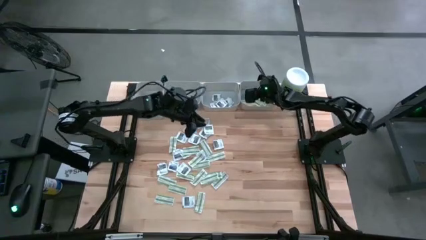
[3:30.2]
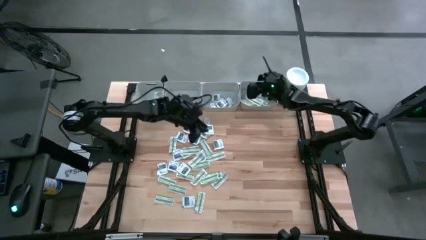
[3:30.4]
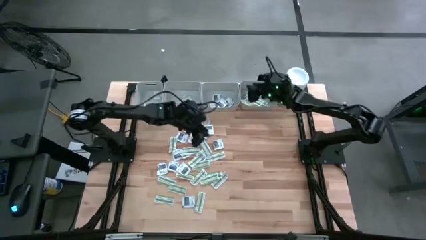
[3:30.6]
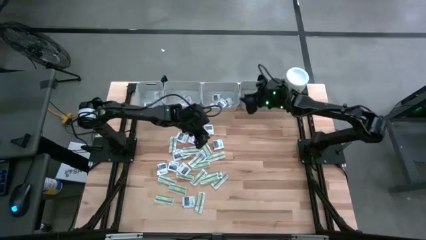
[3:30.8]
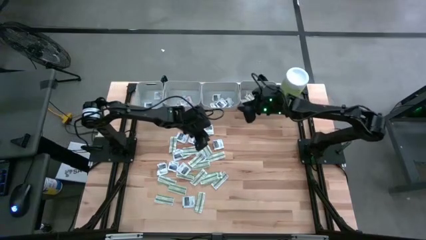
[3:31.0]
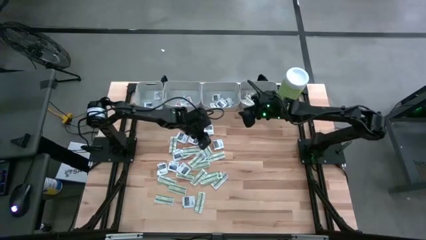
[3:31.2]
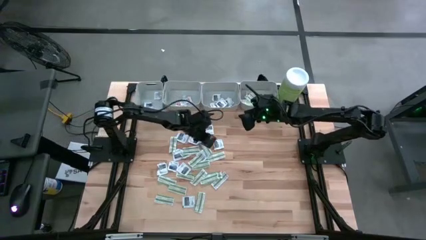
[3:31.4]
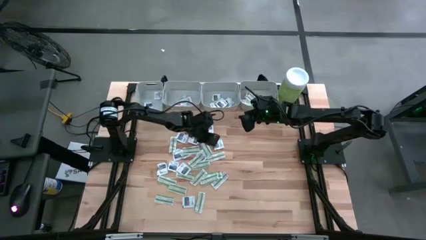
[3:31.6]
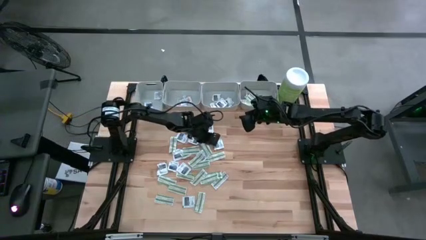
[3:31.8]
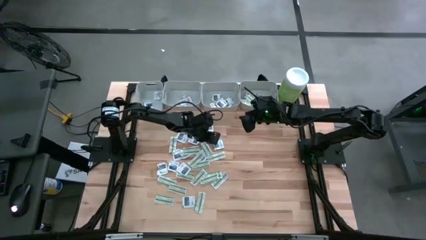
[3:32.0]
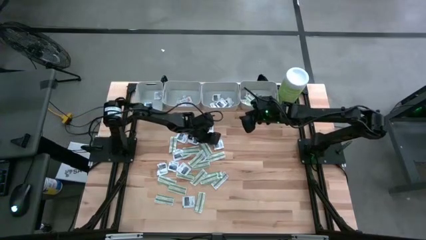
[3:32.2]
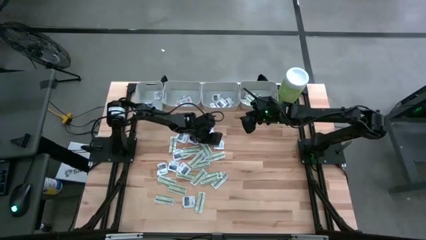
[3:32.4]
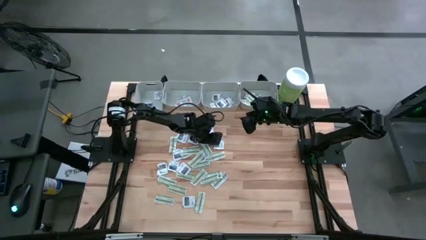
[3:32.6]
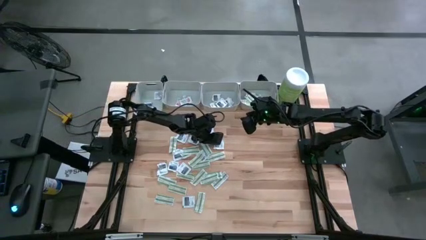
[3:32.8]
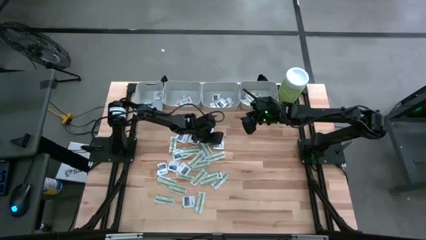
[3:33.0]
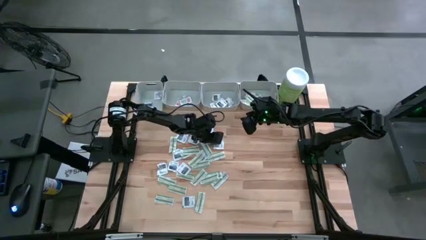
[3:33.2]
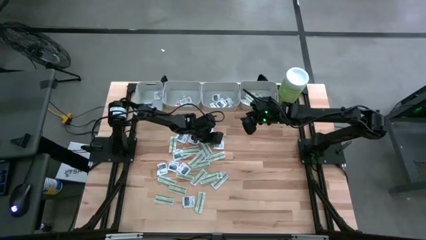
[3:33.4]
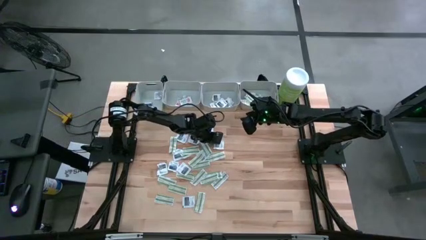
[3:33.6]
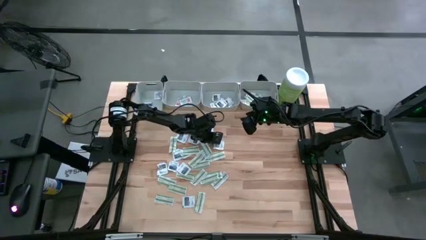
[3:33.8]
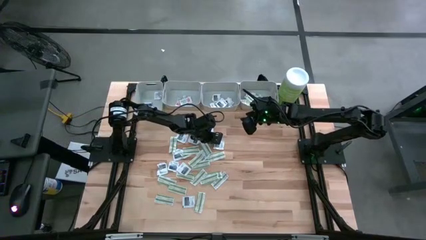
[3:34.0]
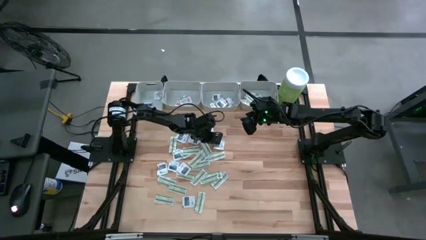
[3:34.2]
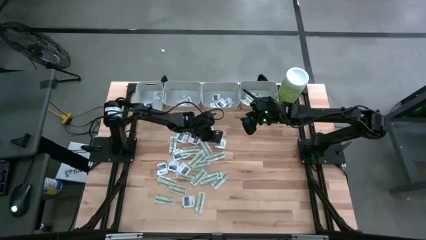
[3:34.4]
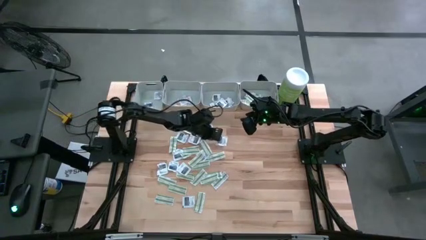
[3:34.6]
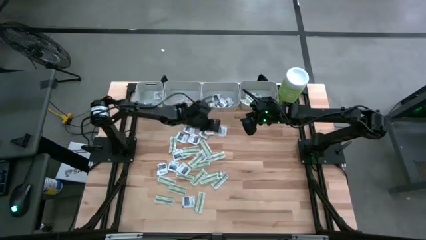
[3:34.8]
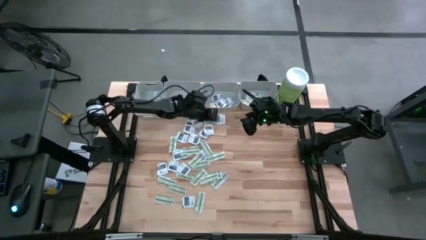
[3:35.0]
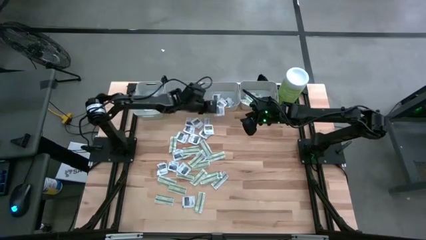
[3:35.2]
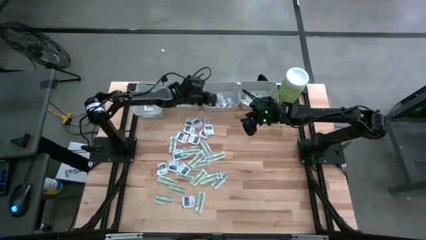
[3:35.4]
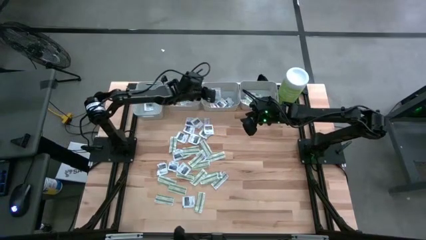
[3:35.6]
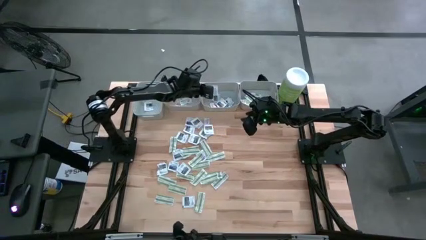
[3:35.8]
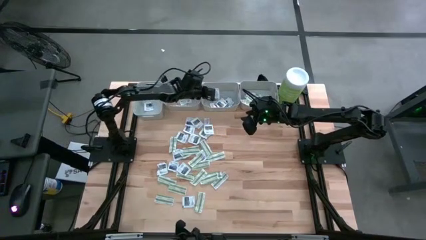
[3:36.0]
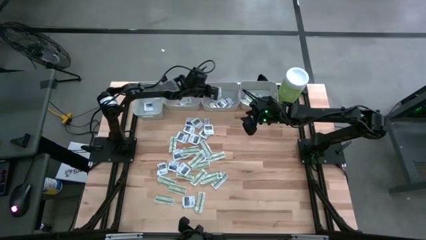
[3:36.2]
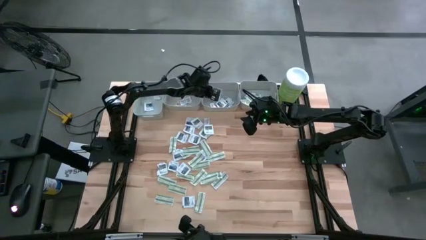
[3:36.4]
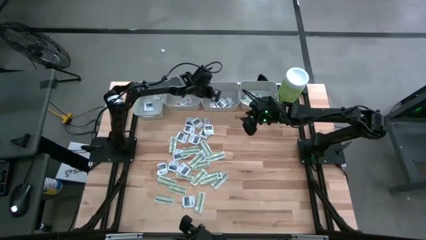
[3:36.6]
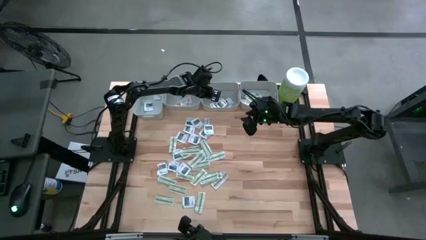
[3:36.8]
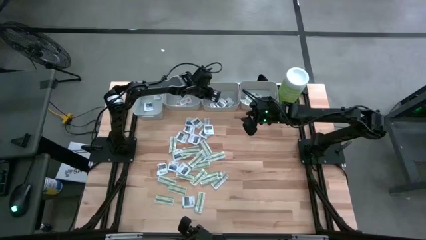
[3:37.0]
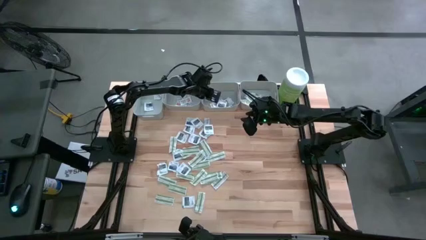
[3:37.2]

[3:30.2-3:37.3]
Task: Pick & Place First Aid Supplies
Put the gray towelette pack into the middle right gray bin

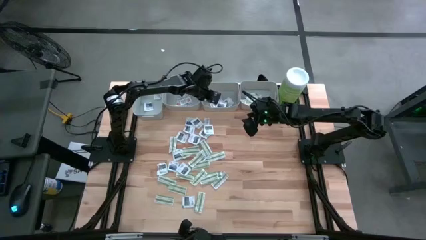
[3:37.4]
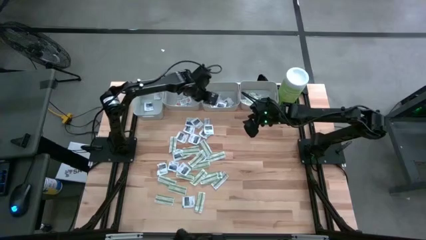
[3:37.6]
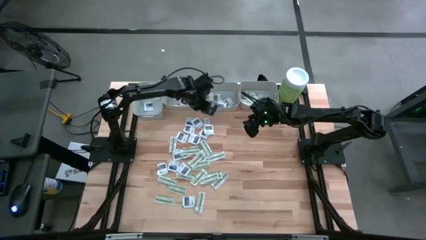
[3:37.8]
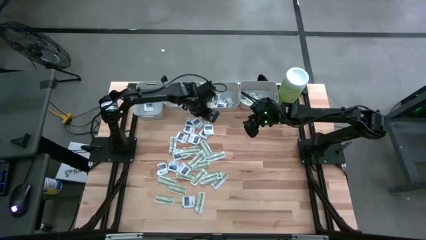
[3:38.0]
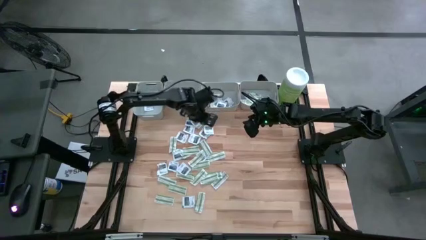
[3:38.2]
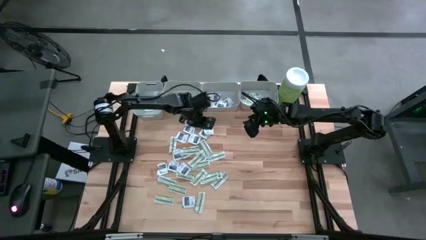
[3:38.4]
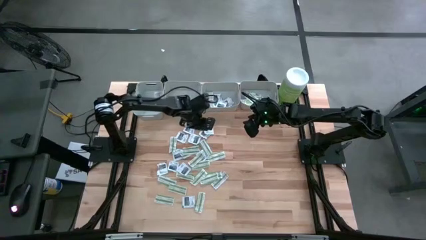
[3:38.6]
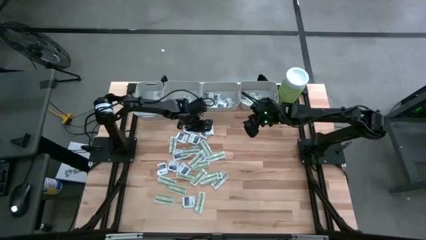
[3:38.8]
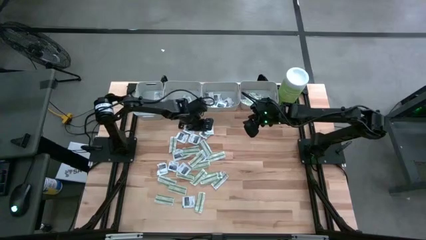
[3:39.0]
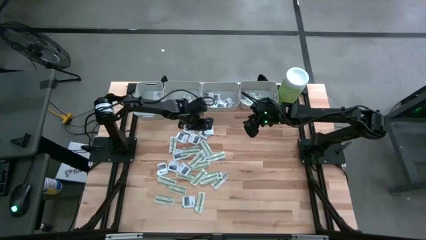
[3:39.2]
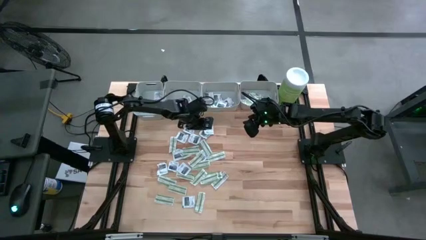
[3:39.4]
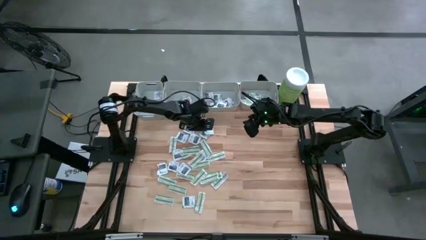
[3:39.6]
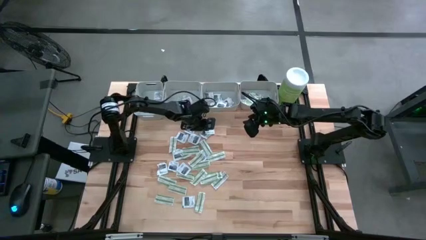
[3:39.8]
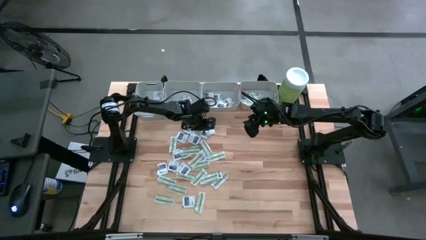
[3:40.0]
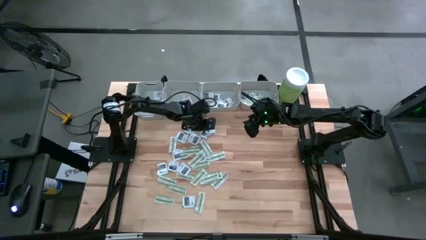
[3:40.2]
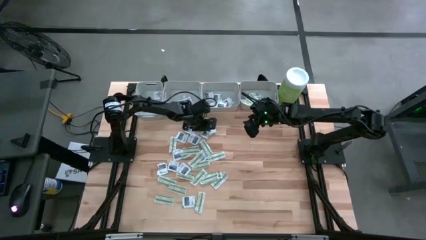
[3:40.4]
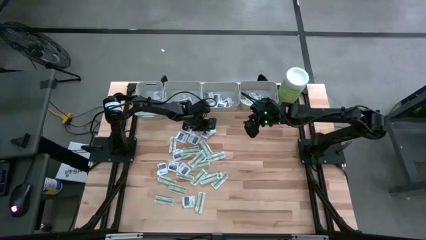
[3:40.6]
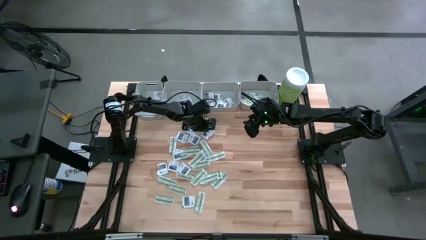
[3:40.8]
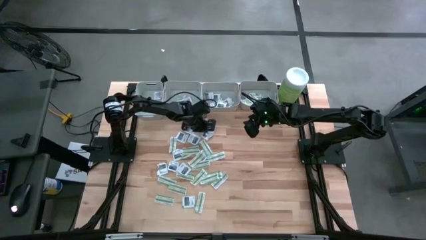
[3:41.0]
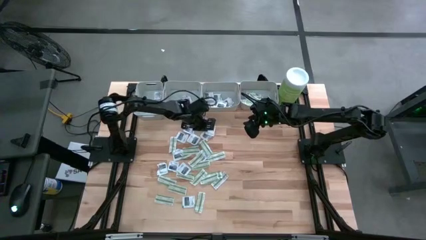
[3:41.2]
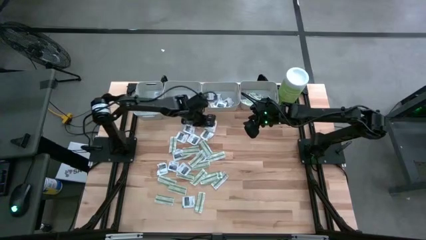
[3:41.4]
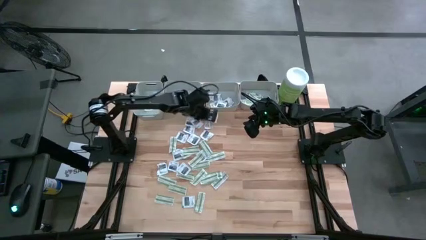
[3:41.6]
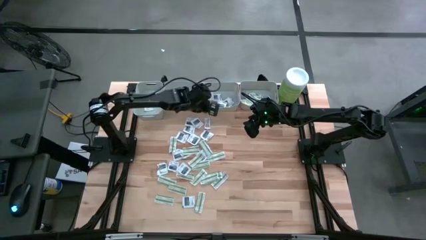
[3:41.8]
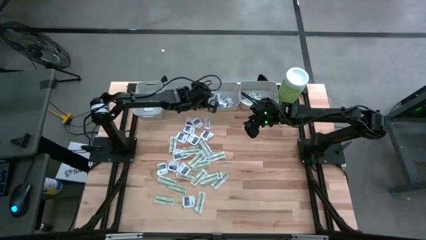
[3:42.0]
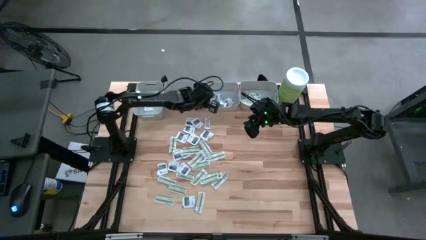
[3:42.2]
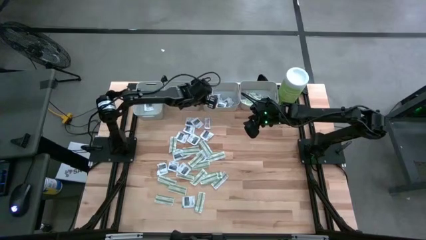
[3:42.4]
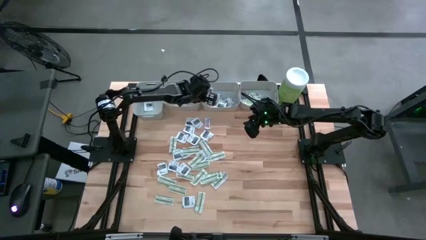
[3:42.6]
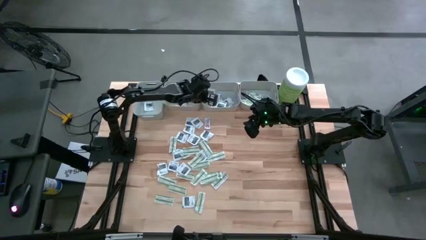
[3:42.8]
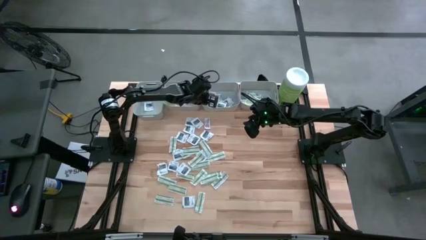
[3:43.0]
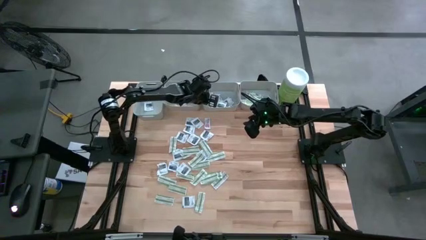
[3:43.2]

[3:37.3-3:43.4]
Put the gray towelette pack into the middle right gray bin

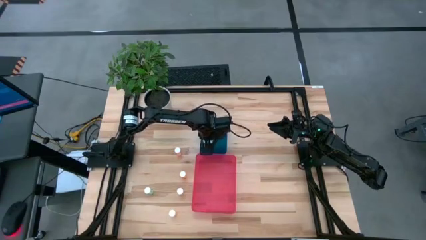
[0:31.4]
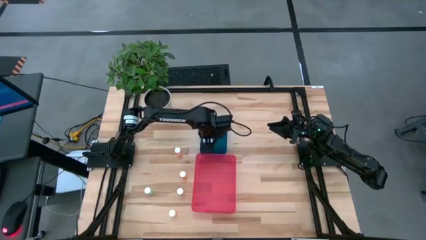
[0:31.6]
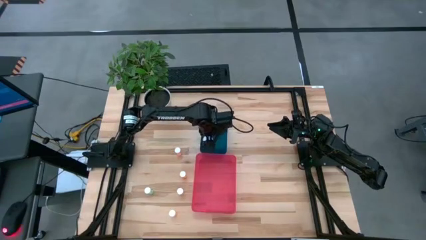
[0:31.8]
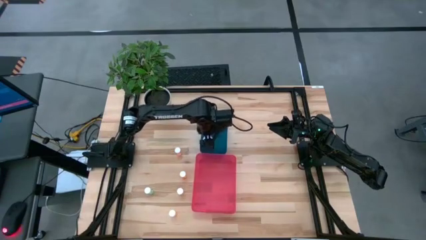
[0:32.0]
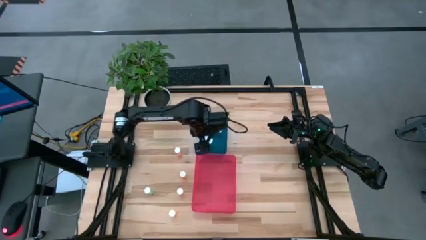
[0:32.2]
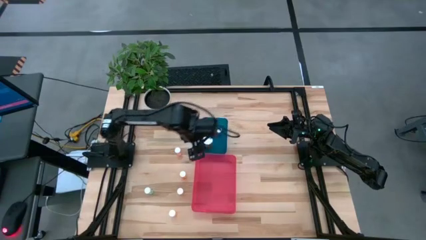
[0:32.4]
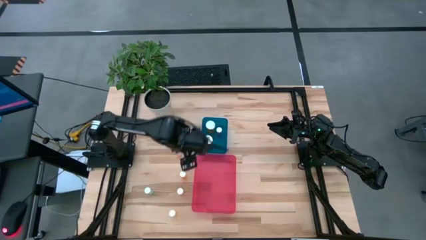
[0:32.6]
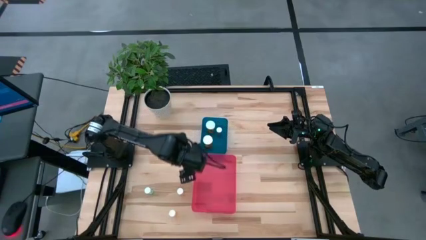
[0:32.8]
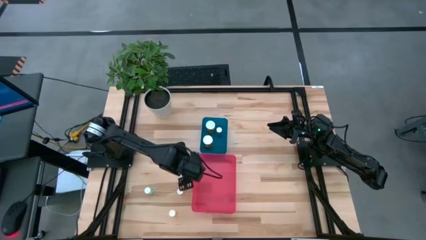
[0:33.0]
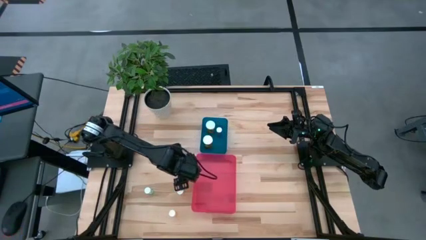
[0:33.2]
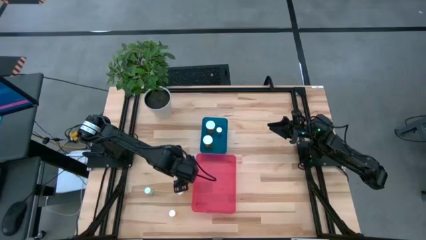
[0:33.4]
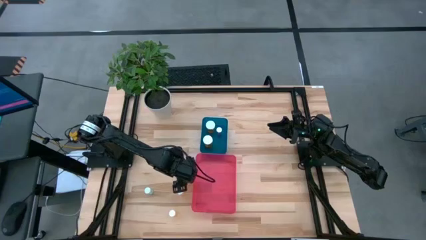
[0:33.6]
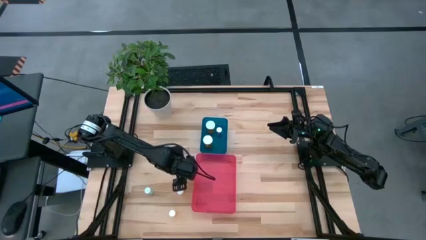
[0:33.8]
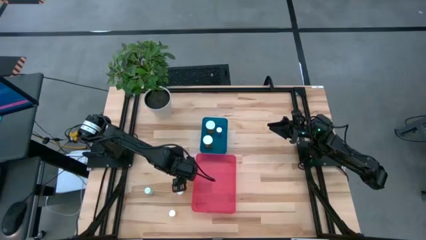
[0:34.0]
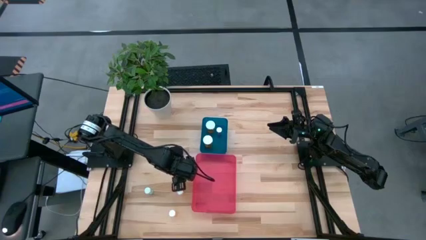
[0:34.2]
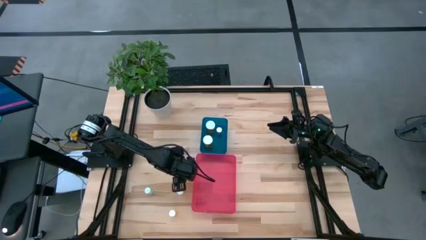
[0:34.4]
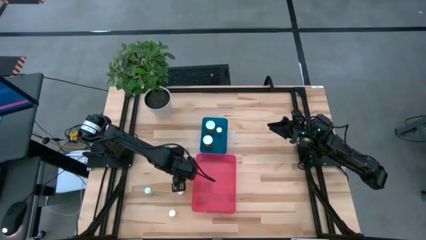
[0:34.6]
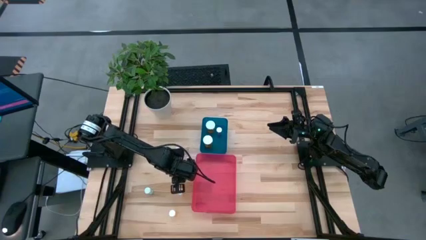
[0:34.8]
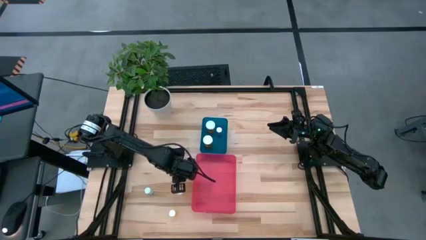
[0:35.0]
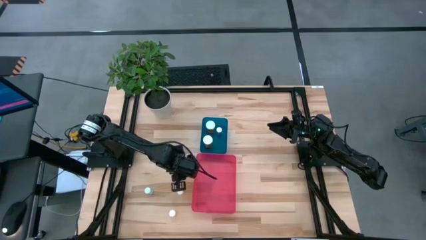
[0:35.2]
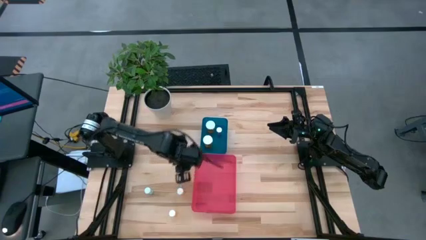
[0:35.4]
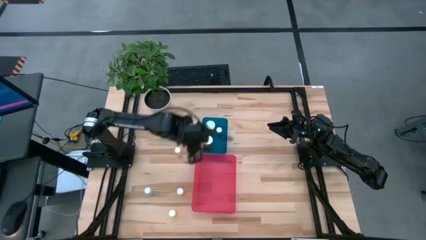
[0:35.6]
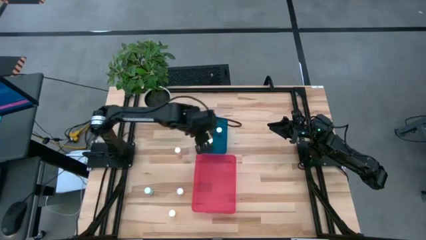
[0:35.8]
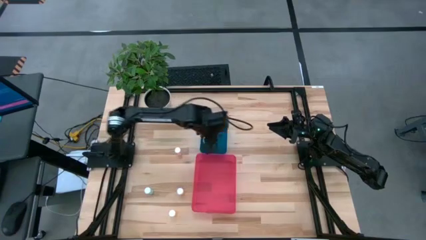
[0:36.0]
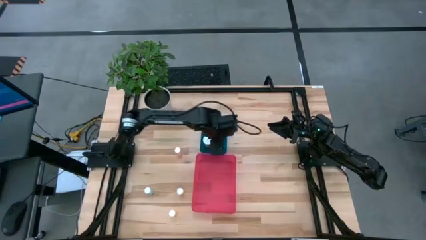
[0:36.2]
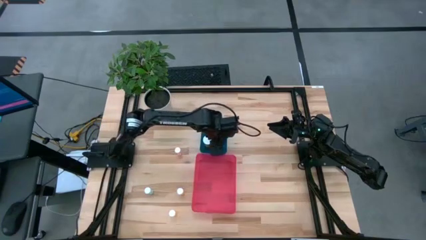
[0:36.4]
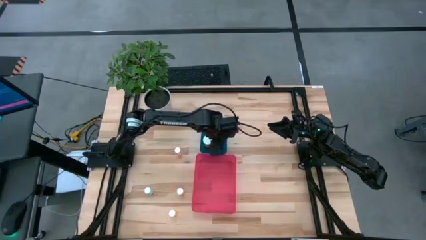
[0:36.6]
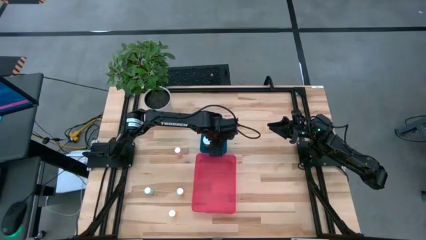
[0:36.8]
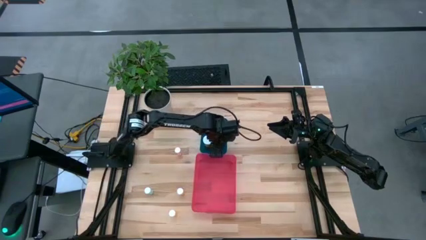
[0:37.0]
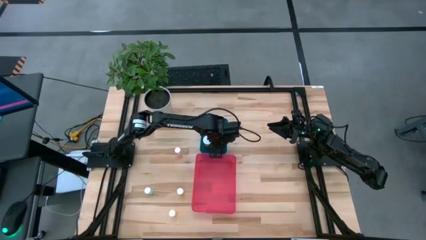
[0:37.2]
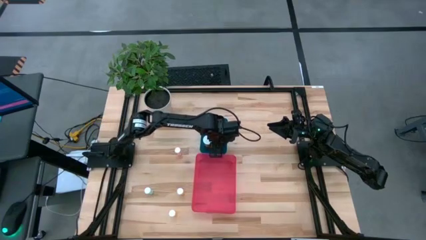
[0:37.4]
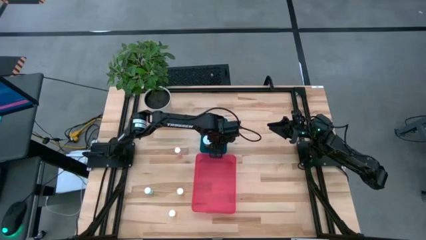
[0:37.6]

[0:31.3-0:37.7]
Task: Pick and place medicine bottles into bin by pill shape (circle, oval)
Put the small orange capsule bottle into the blue bin
